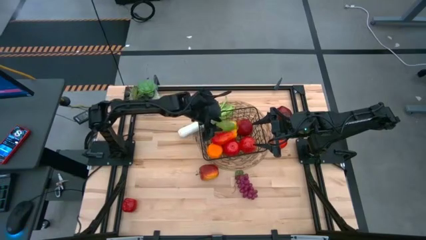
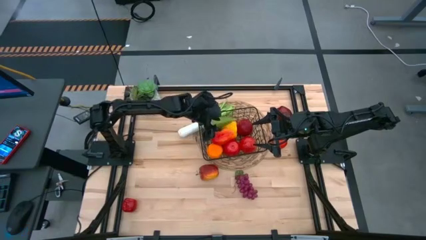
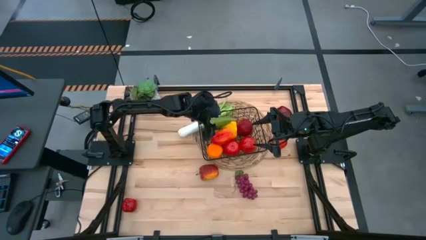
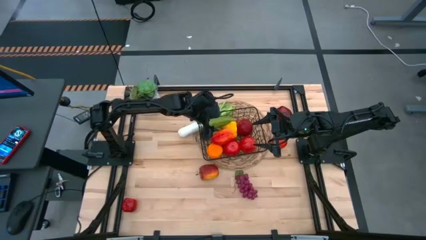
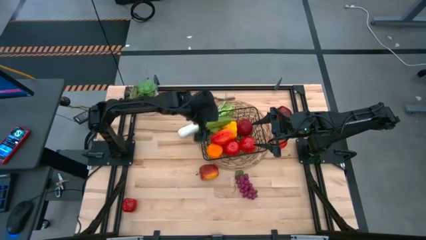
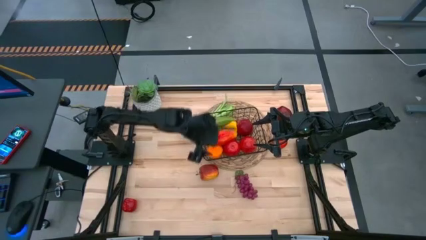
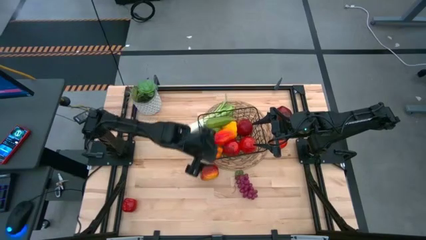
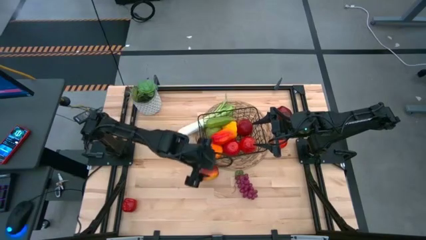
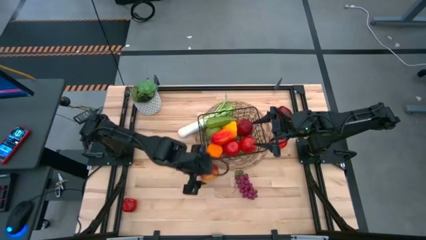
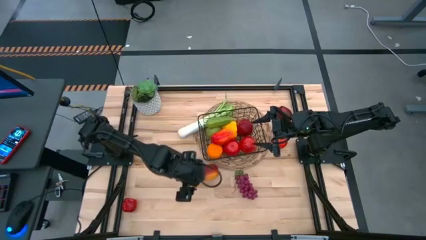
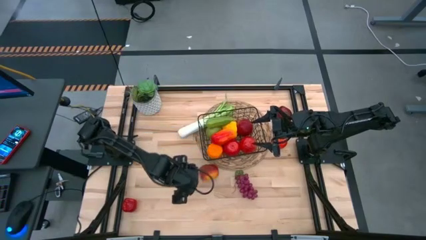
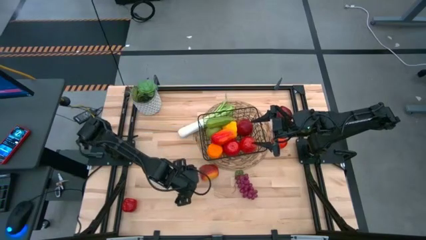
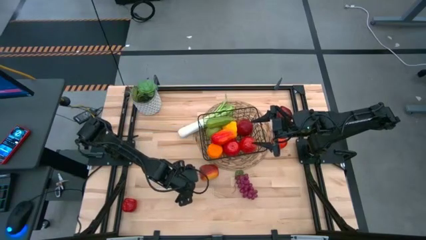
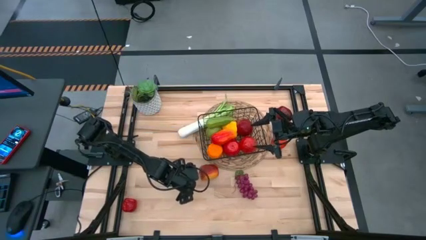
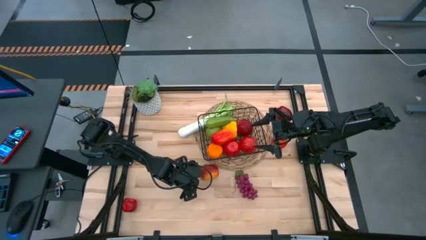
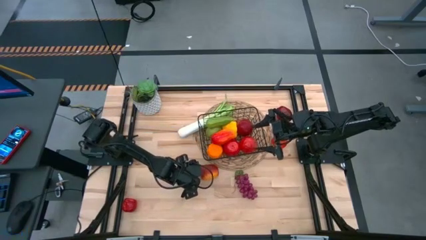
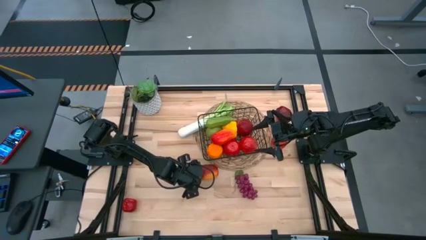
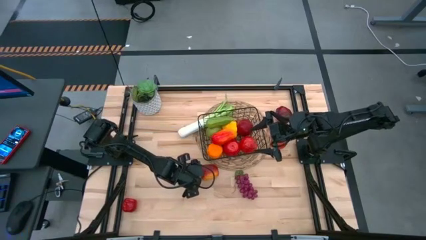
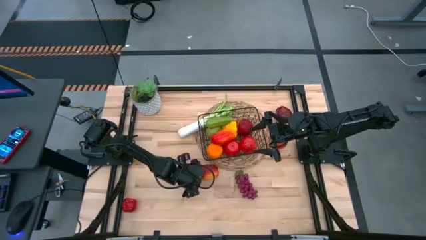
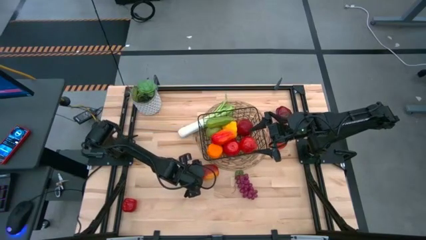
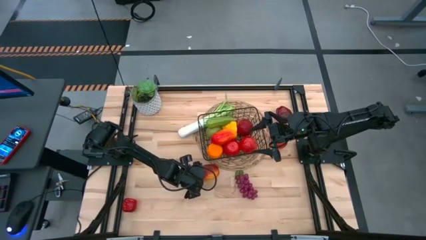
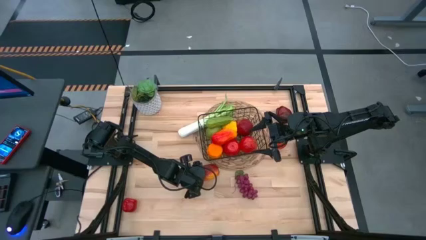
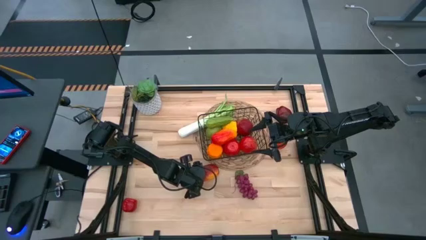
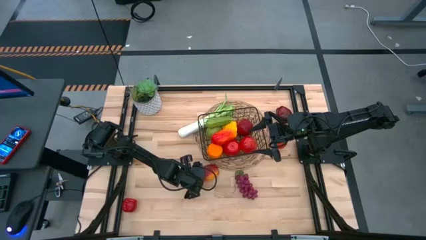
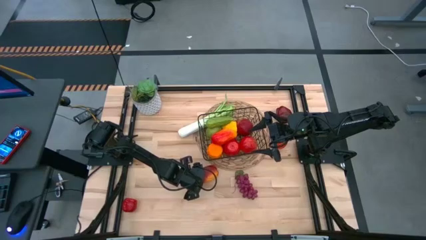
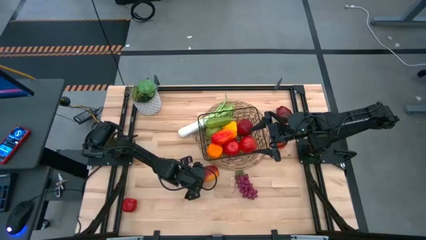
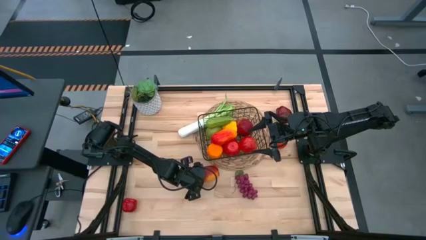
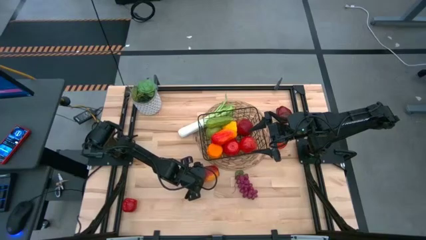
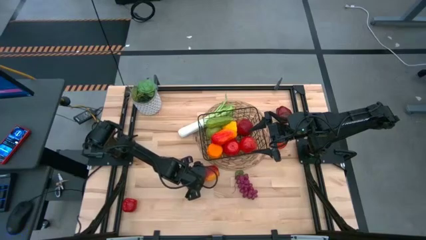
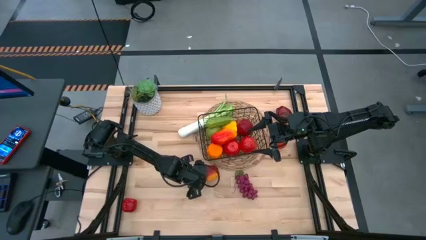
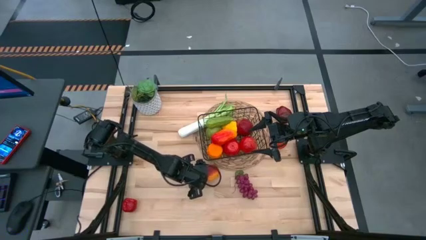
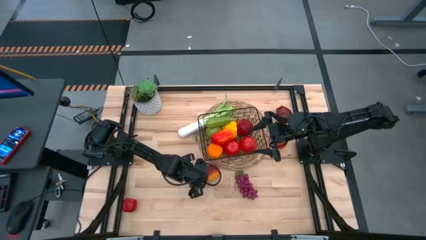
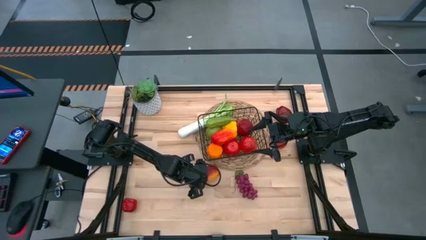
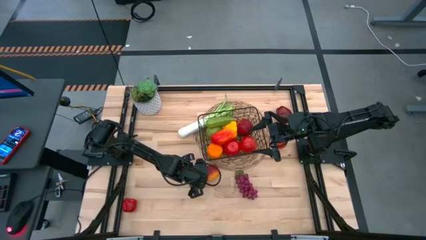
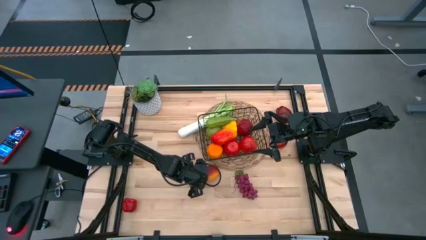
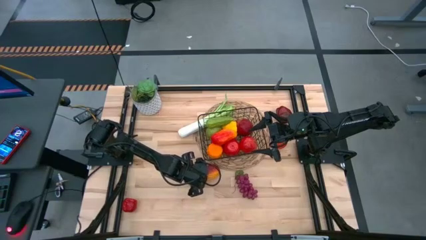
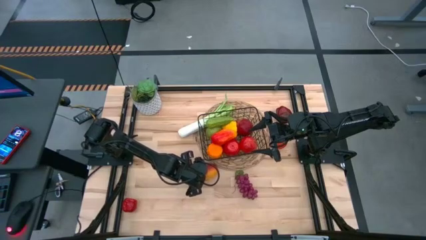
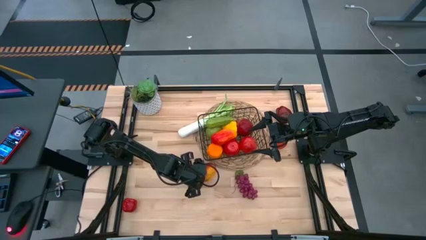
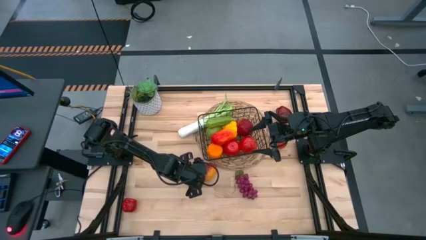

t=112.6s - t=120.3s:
Task: Build produce basket
Put the apple into the wire basket

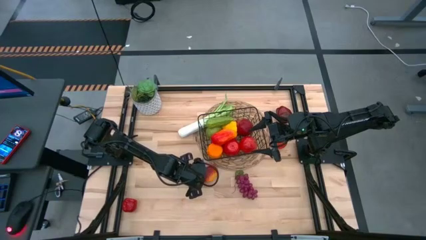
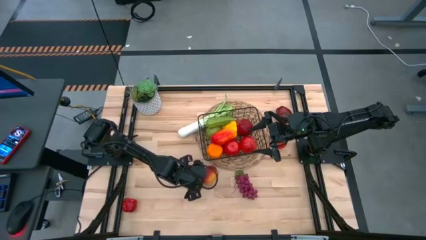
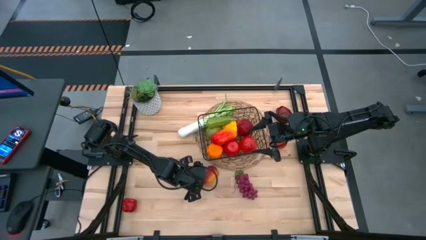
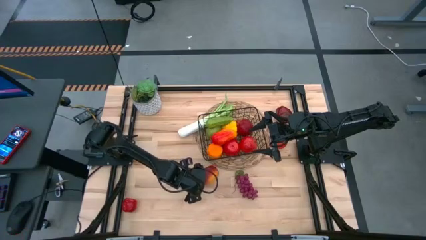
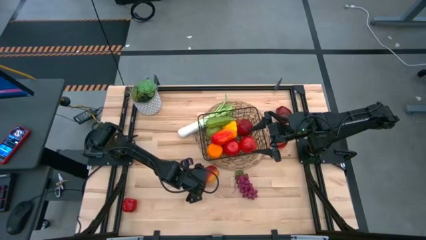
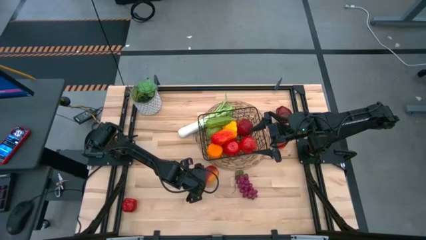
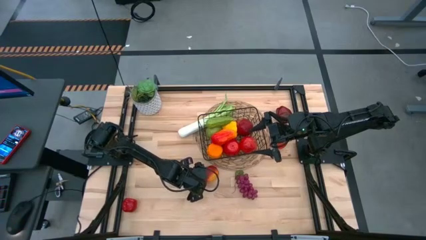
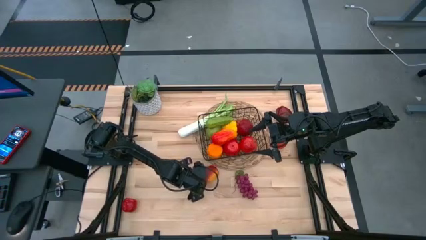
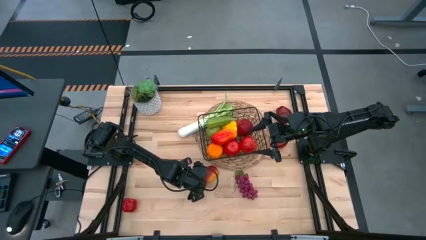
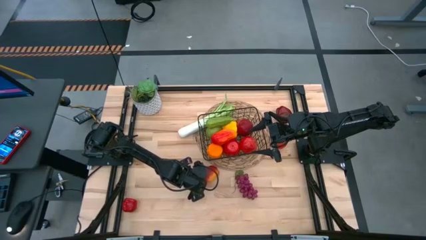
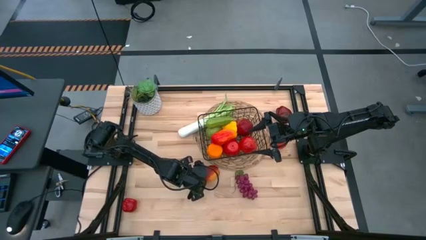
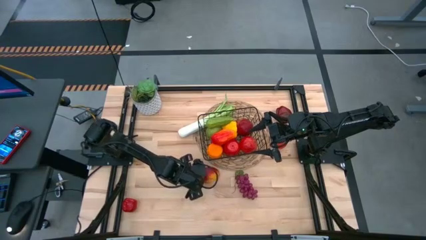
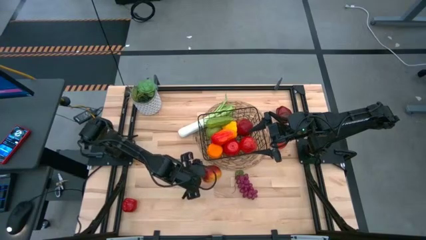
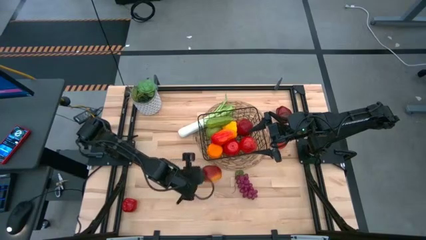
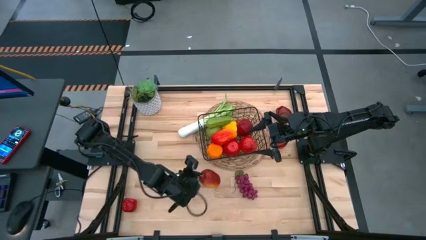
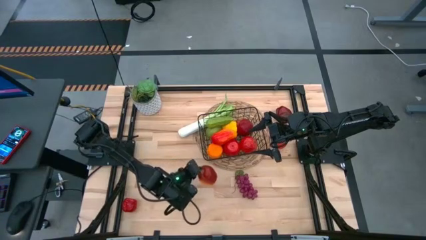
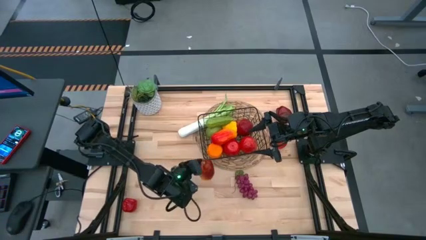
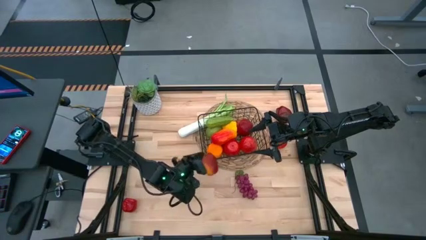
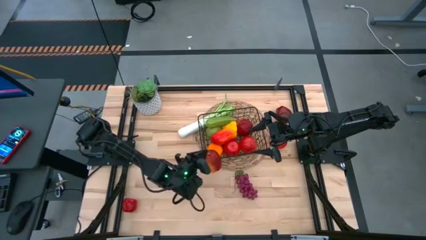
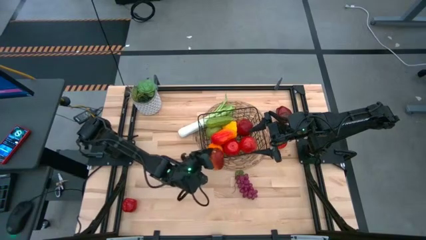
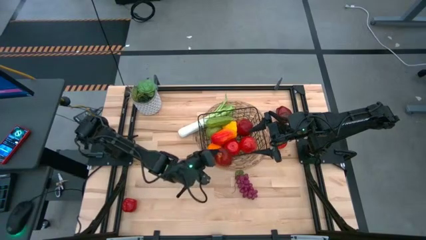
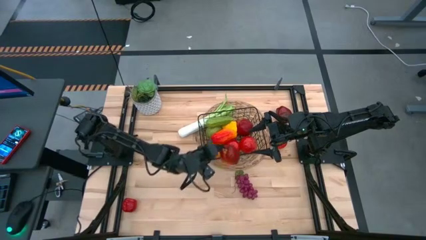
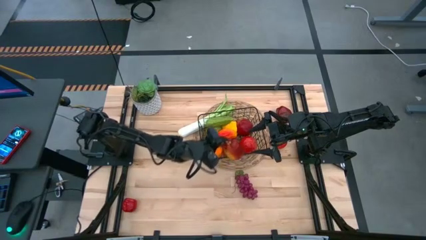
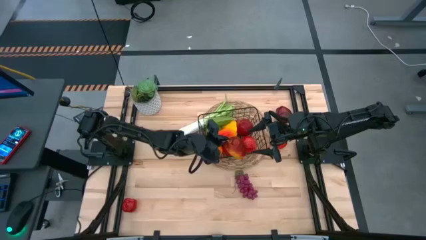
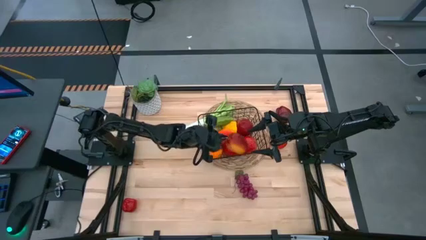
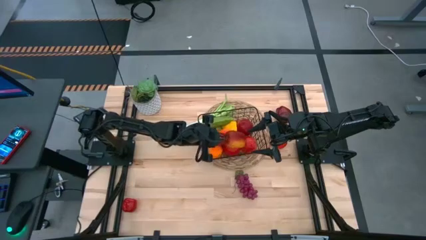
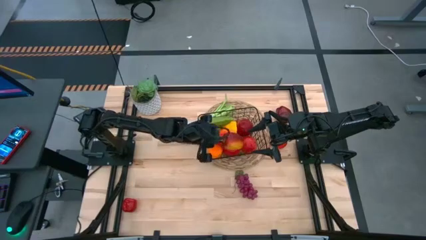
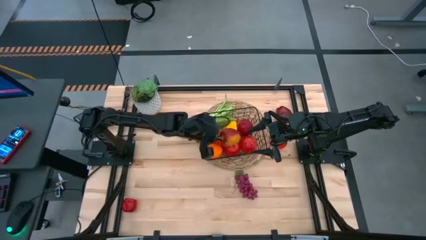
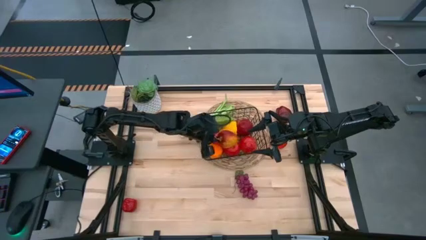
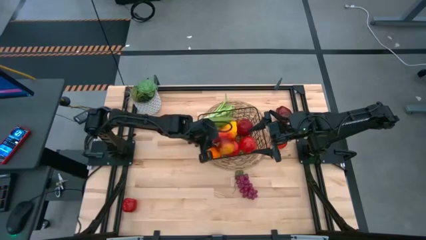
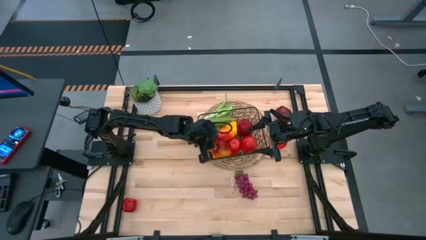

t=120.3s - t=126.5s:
Put the apple into the wire basket

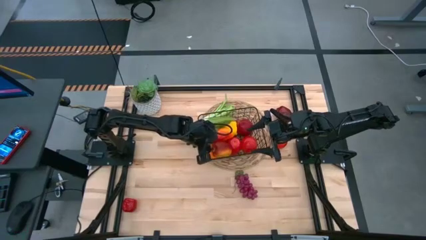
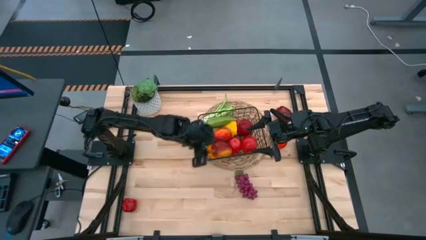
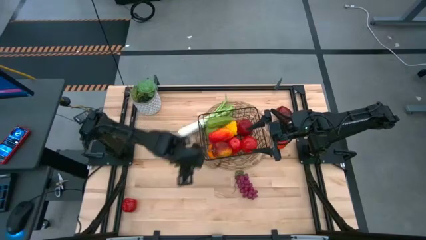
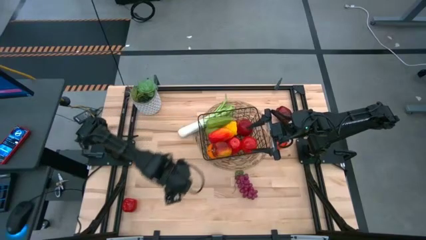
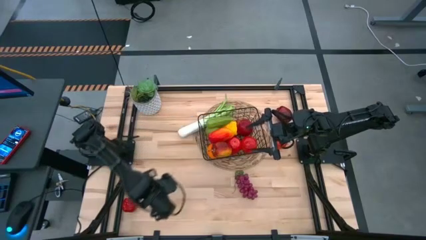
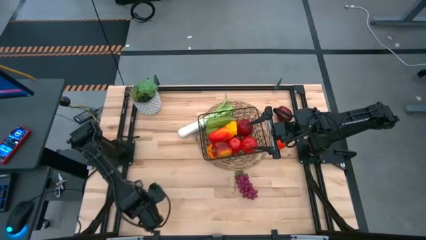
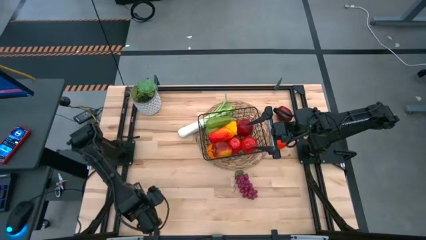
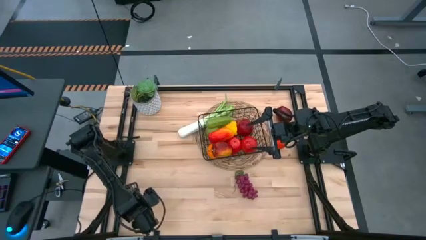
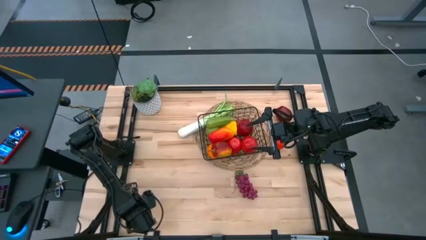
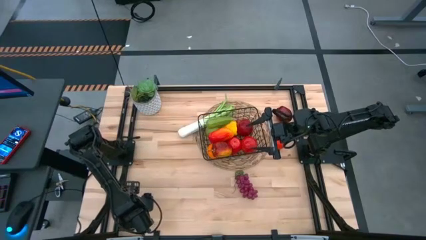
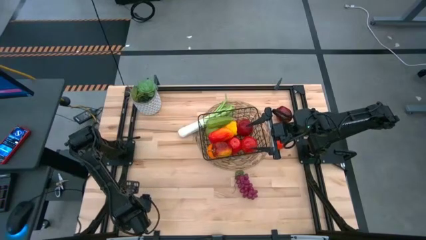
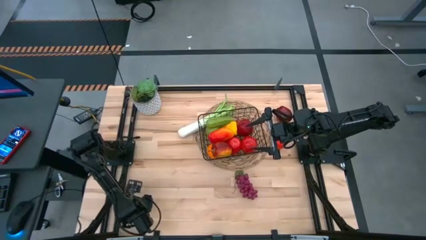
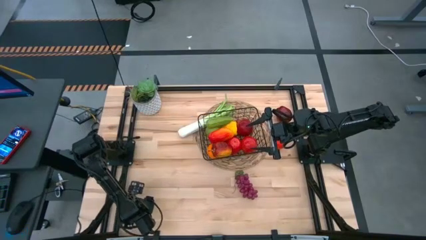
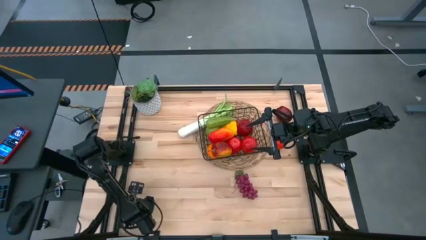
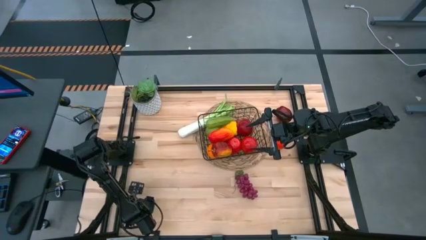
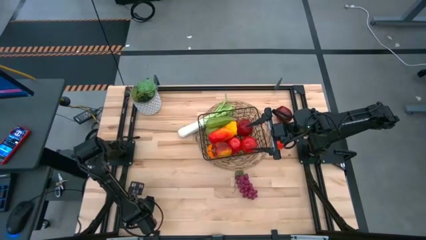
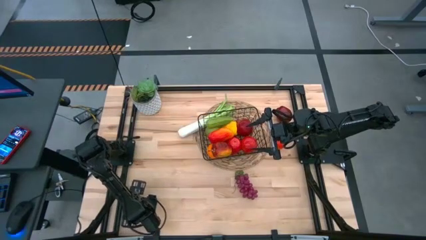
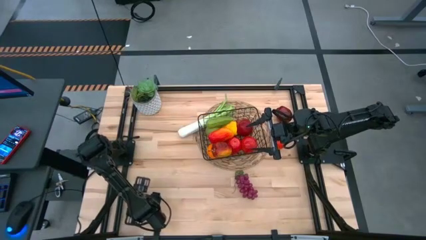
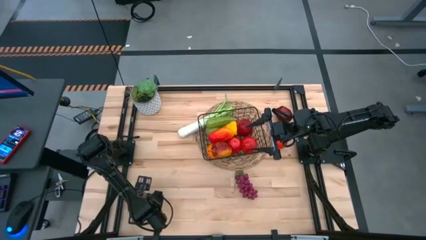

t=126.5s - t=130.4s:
Put the apple into the wire basket
